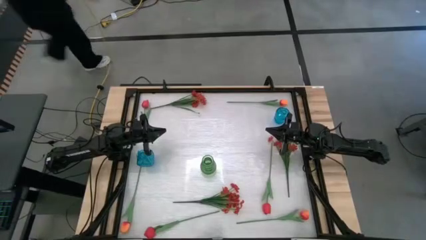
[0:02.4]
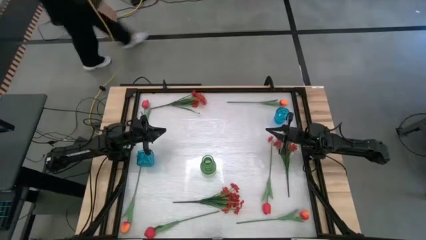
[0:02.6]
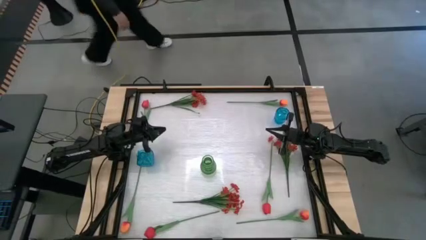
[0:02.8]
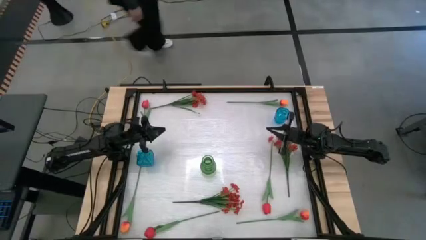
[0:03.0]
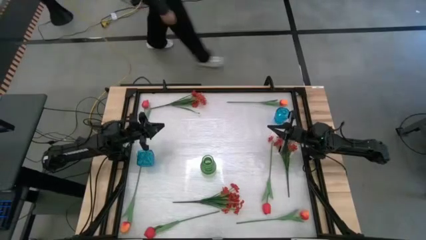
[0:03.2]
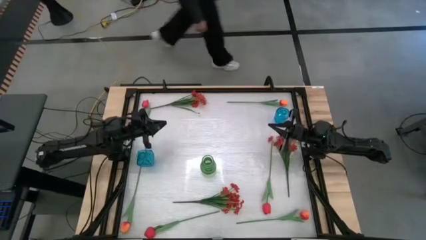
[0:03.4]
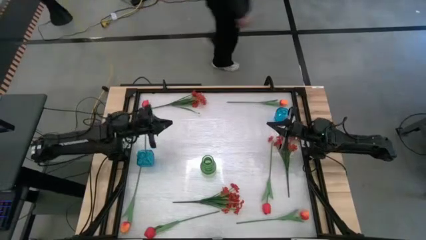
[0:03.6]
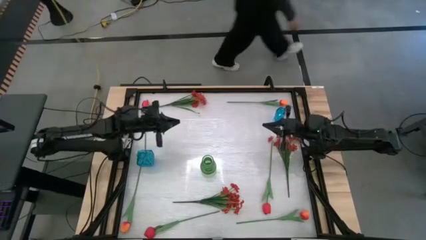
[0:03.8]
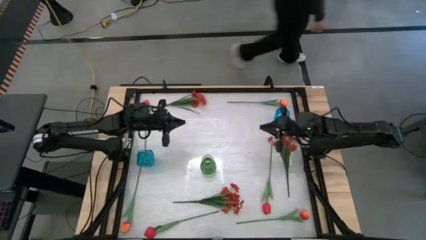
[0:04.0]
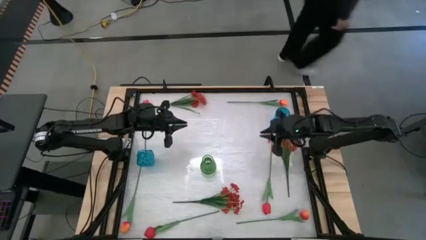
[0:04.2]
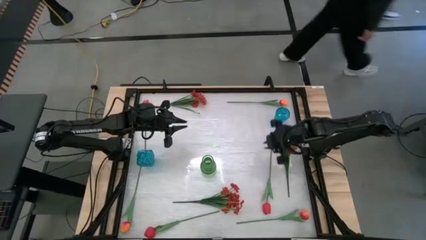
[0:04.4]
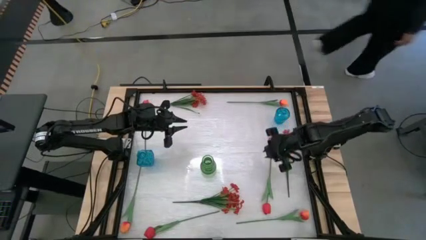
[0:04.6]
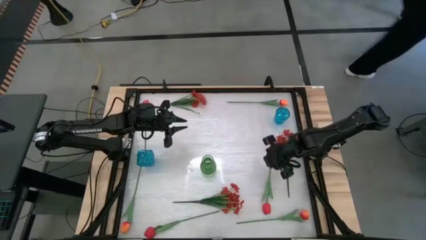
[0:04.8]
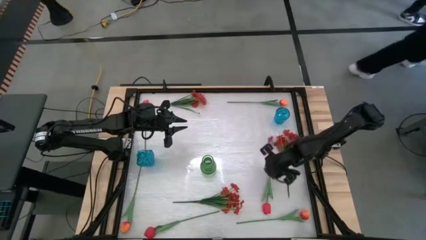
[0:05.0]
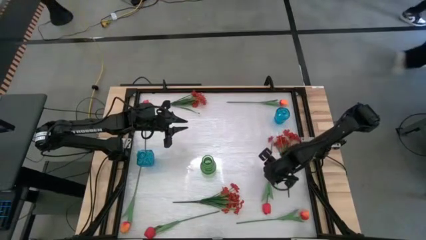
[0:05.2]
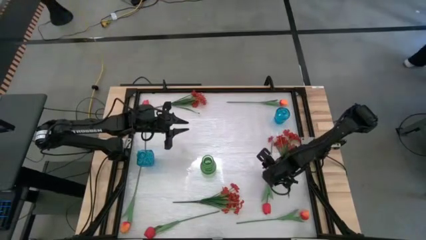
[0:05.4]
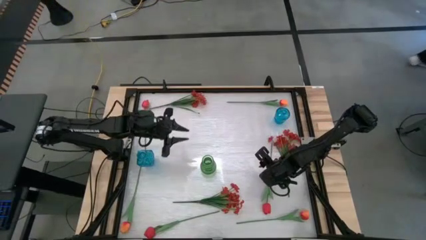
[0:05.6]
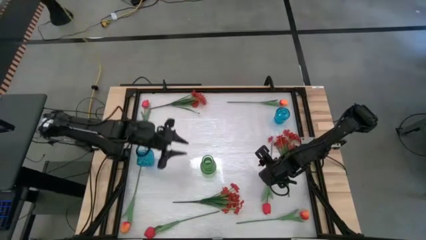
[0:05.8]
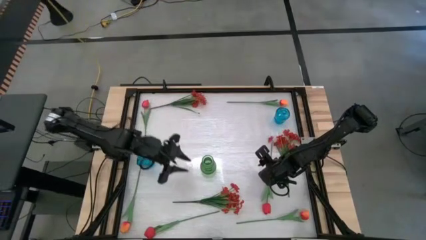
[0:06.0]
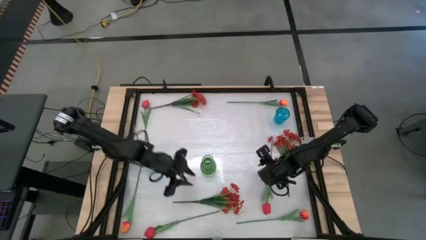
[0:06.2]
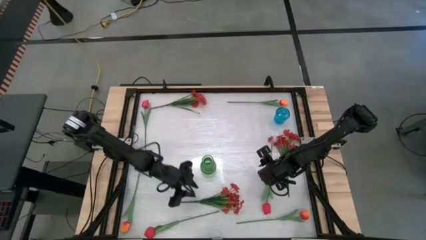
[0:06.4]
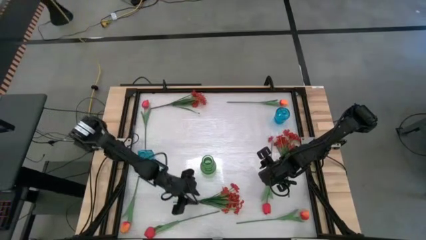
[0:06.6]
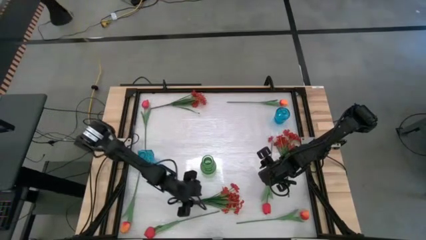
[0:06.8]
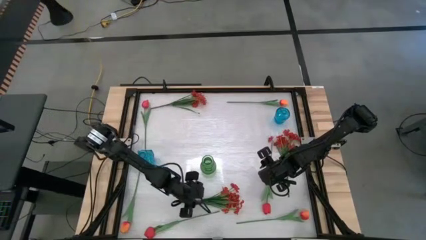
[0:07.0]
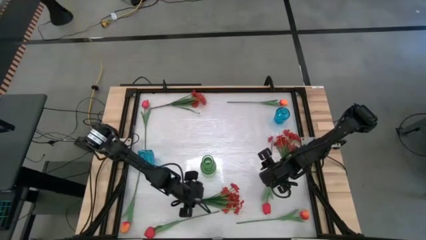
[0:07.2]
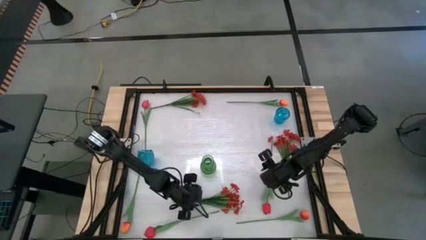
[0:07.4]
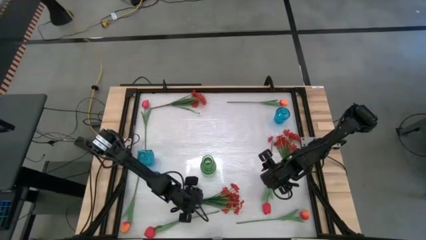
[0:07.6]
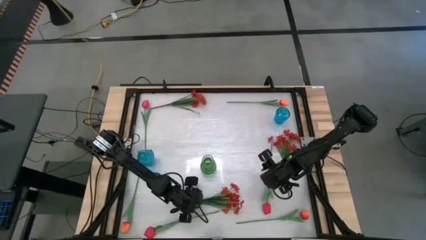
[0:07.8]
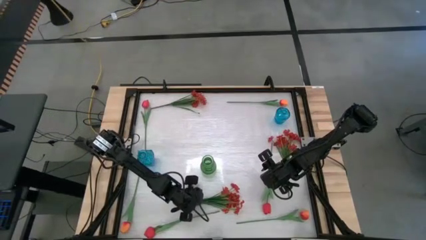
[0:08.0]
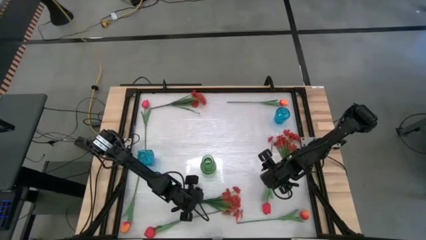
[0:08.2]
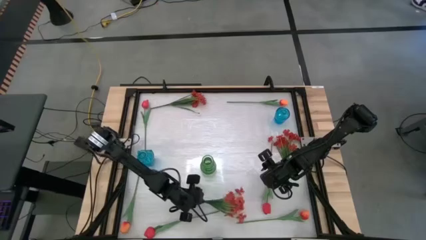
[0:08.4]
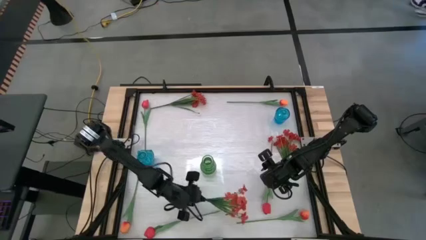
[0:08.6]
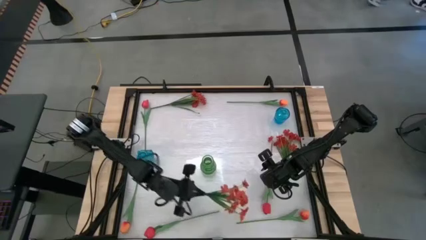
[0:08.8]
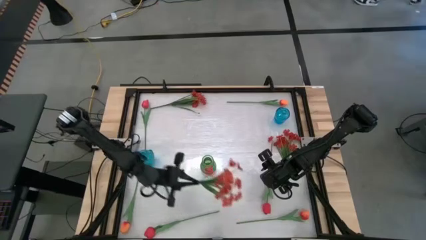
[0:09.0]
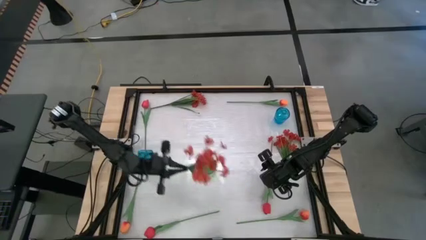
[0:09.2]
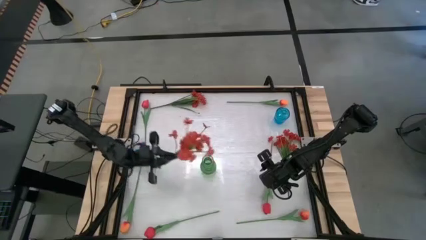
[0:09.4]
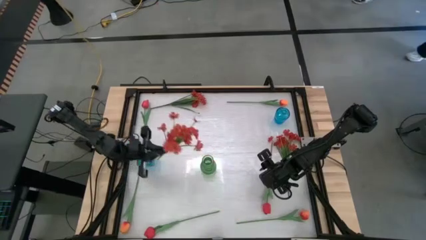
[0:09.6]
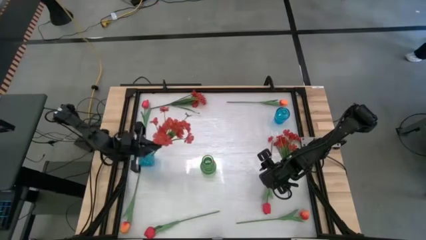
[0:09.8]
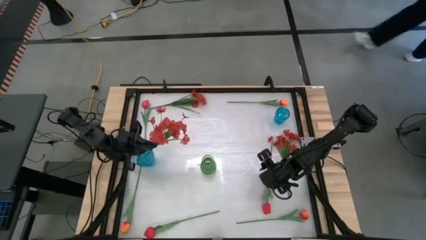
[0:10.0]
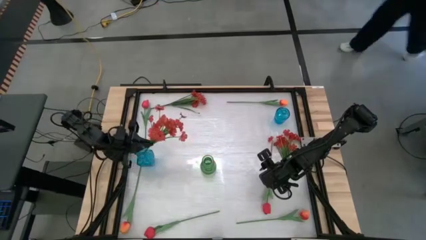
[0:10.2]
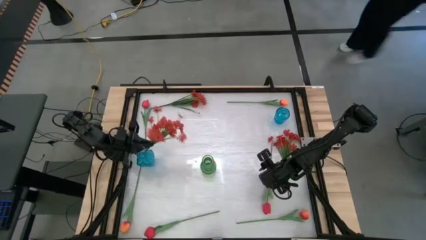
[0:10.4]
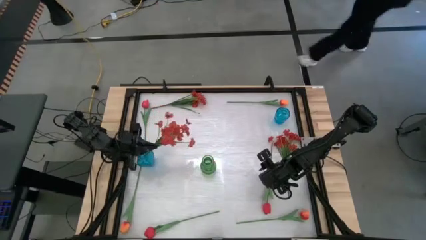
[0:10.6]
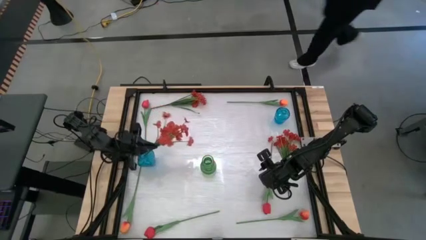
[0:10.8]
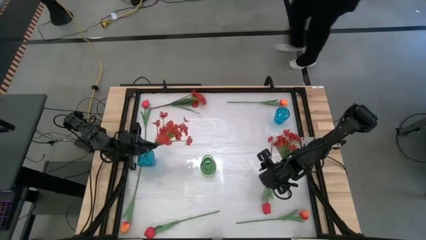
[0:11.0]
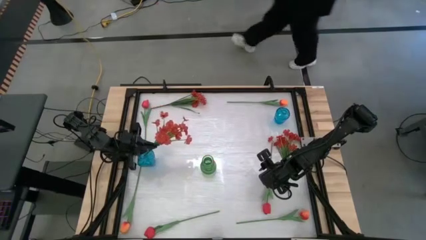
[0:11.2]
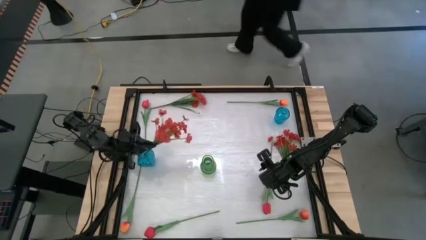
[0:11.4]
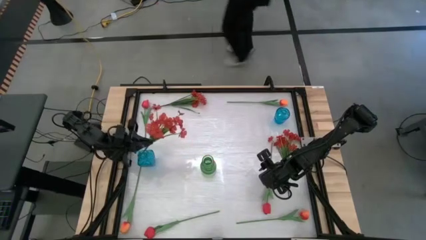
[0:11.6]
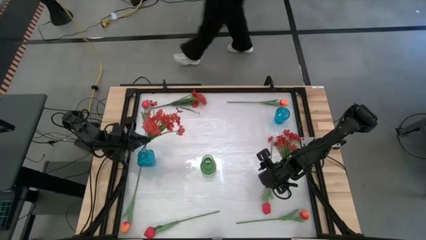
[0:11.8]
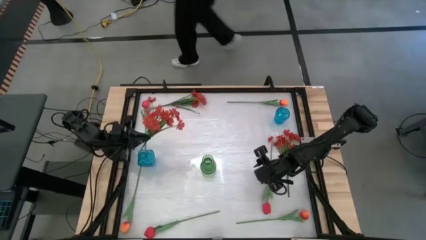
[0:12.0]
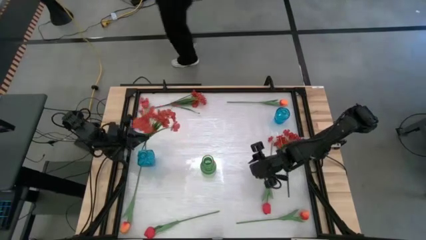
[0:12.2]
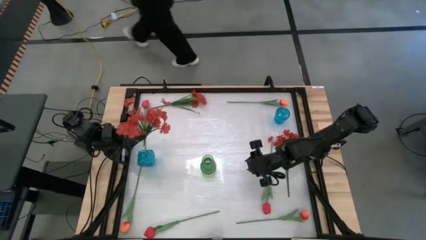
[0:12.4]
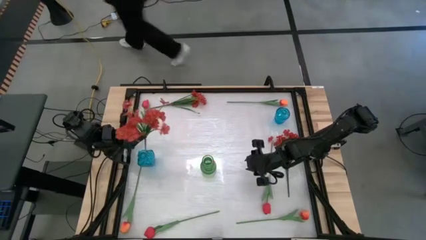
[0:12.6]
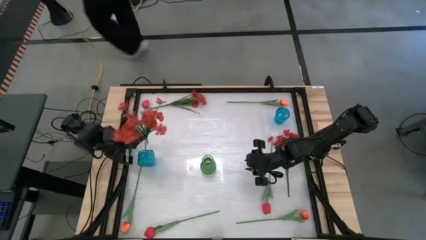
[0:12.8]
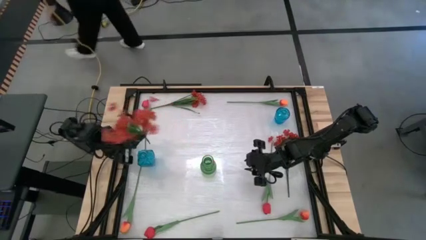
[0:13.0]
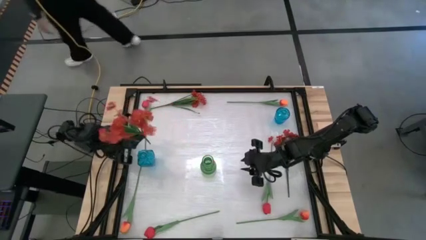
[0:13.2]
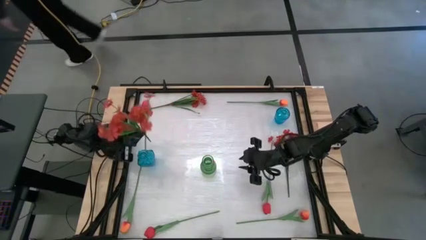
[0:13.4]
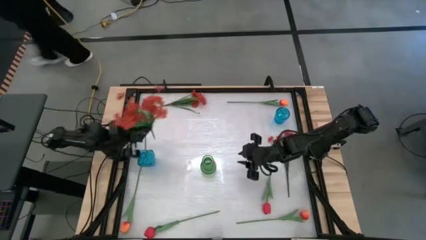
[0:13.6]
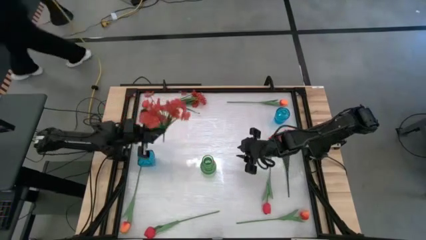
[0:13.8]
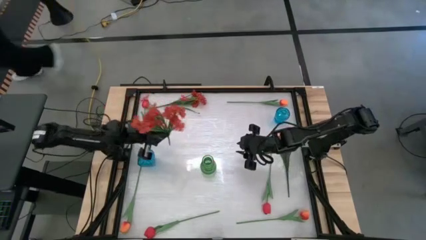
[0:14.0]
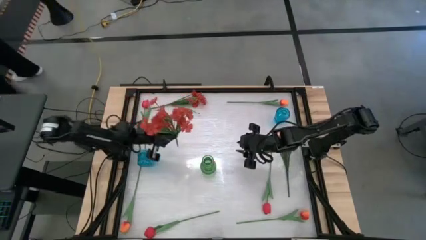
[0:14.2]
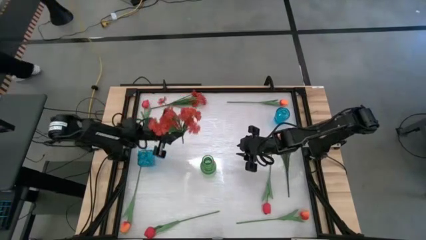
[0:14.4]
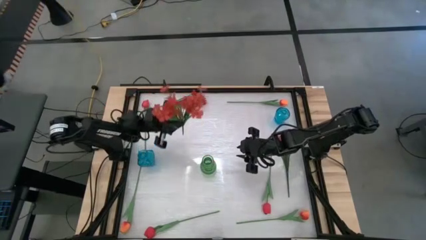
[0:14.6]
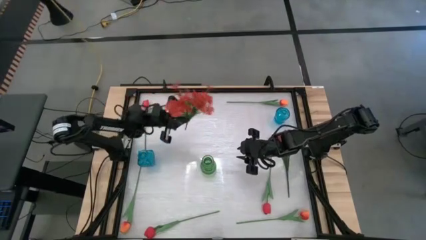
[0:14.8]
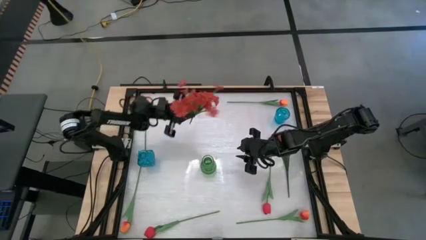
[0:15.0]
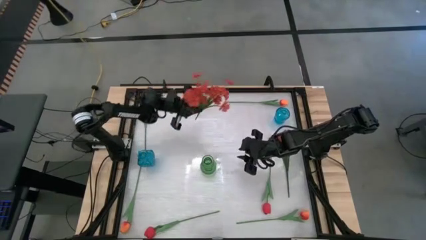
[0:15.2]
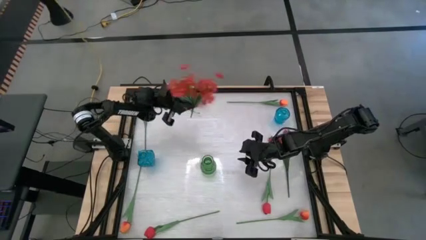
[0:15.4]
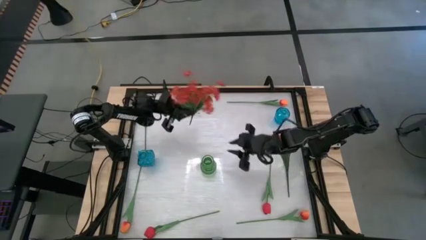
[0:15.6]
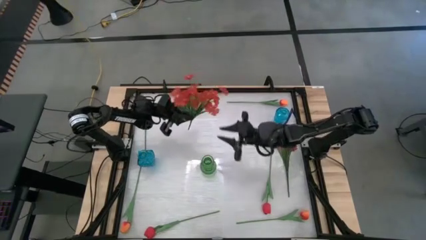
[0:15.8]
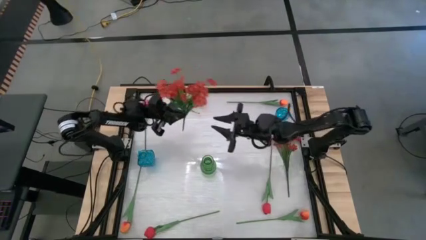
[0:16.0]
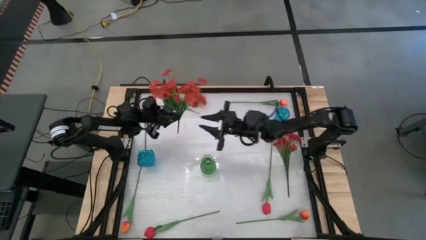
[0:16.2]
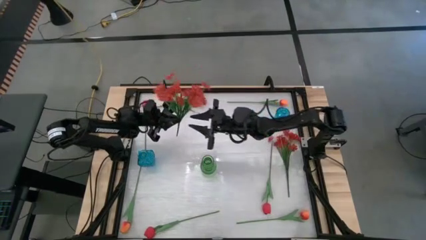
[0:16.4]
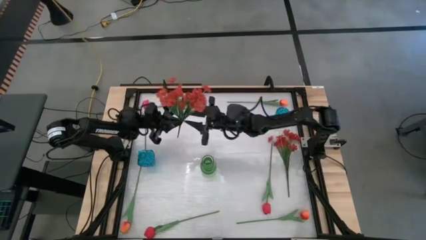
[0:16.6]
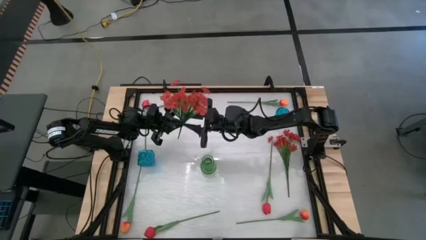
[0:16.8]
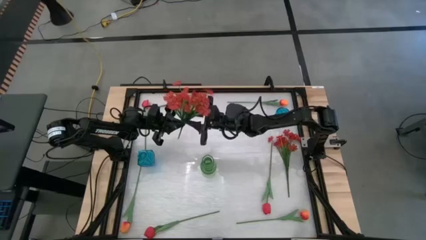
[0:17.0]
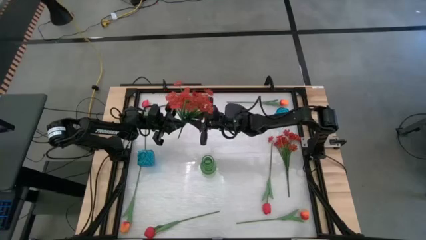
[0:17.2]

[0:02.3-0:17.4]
Task: Sort flowers into vase by color
Put the bottom red flowers into the left blue vase
